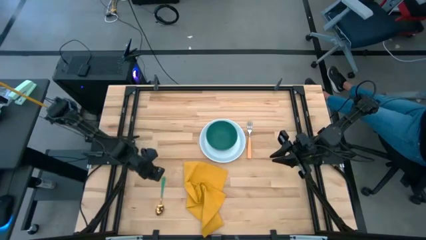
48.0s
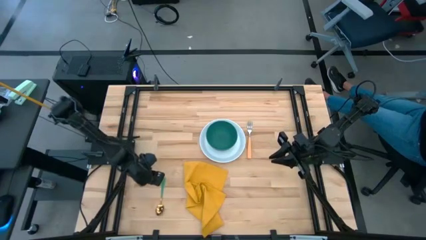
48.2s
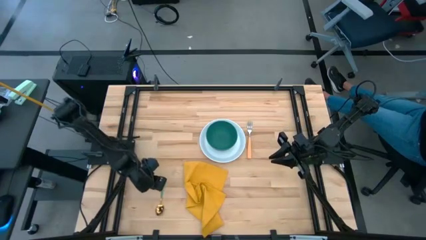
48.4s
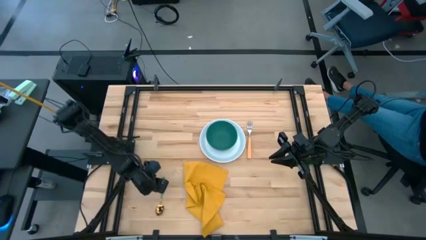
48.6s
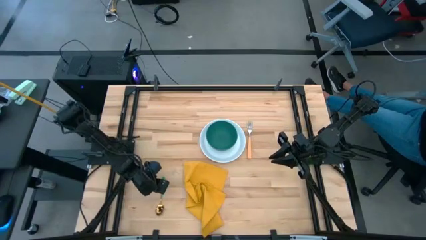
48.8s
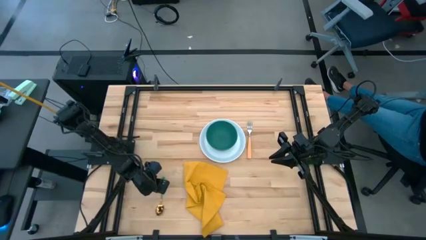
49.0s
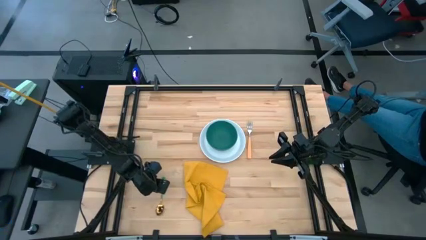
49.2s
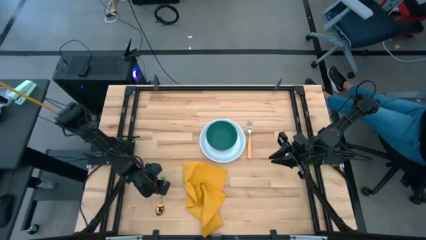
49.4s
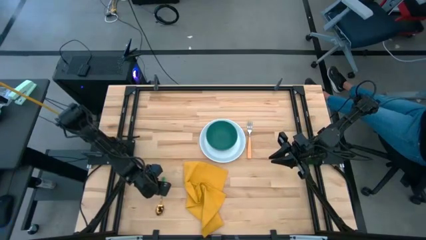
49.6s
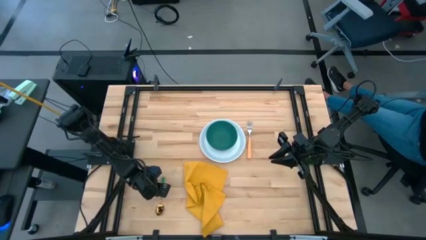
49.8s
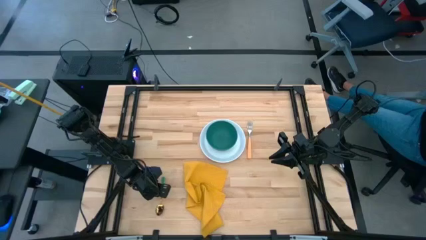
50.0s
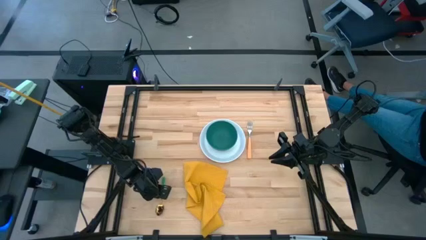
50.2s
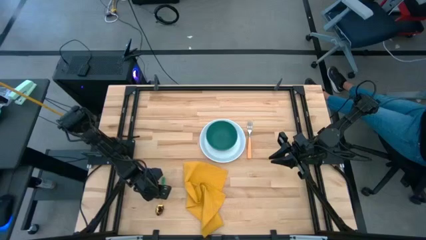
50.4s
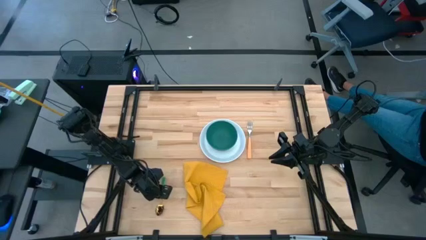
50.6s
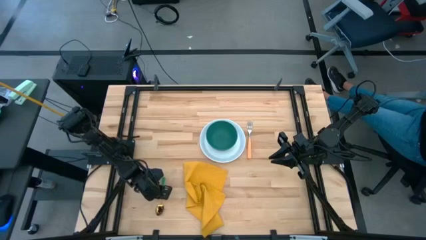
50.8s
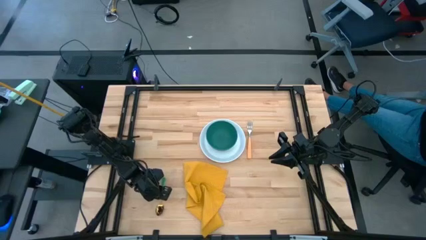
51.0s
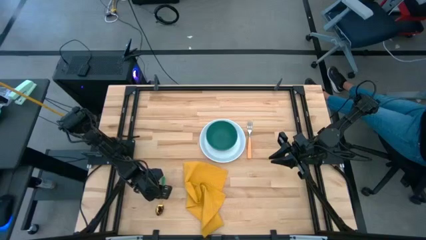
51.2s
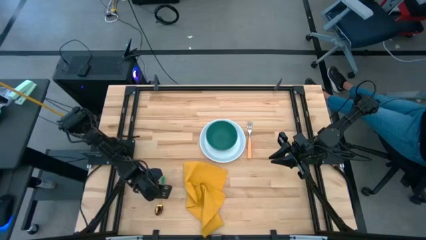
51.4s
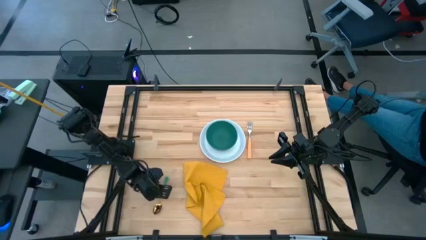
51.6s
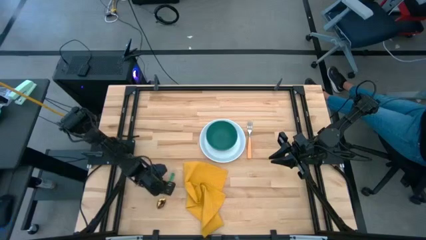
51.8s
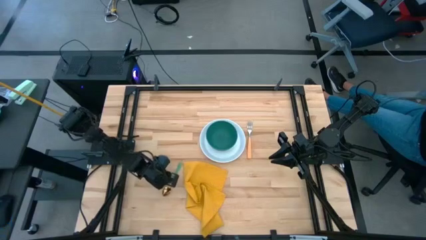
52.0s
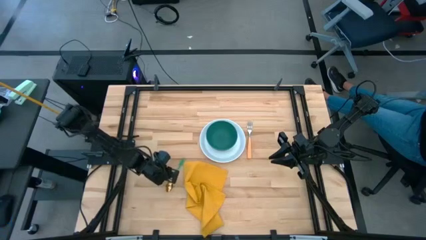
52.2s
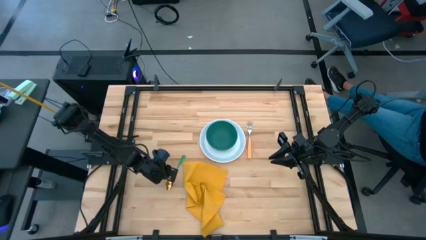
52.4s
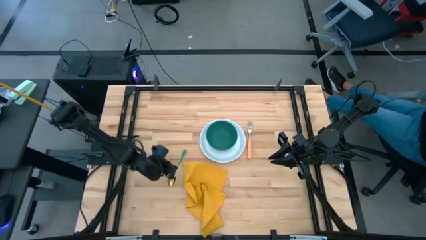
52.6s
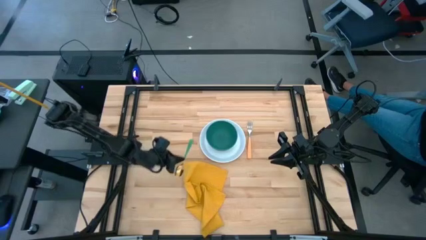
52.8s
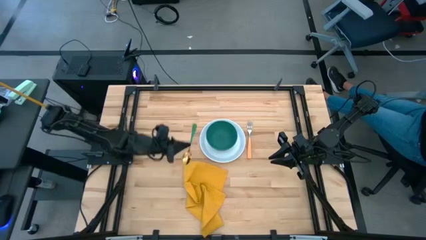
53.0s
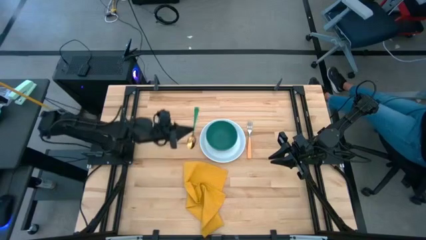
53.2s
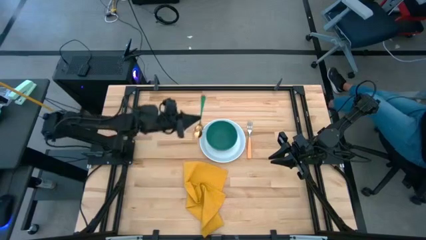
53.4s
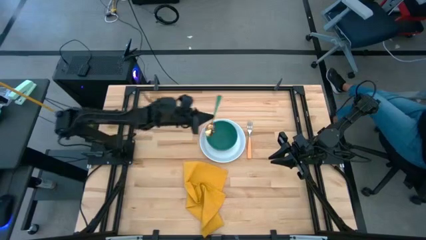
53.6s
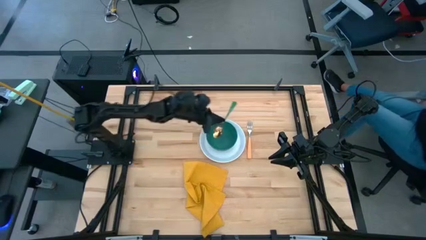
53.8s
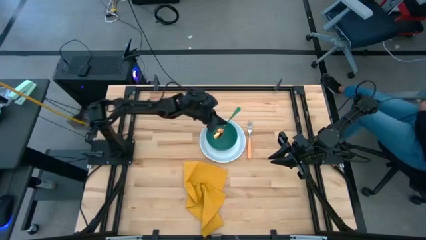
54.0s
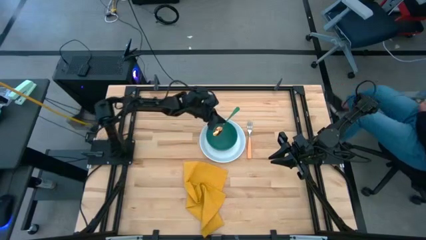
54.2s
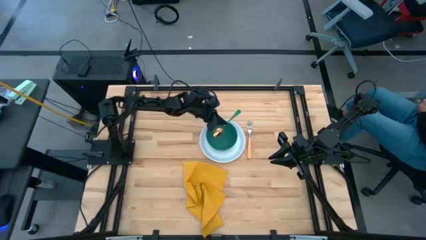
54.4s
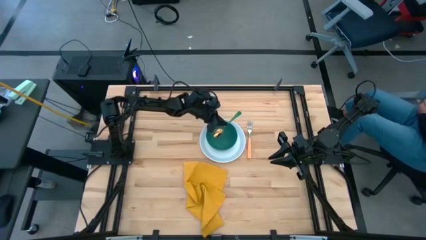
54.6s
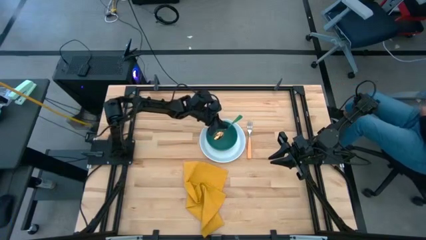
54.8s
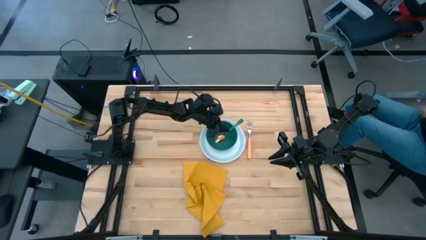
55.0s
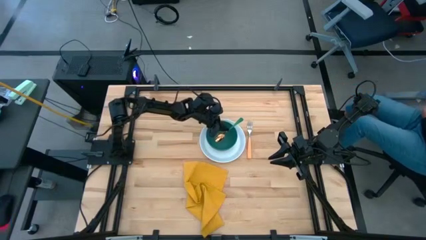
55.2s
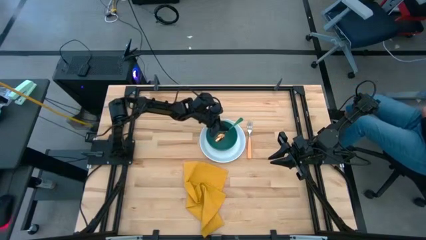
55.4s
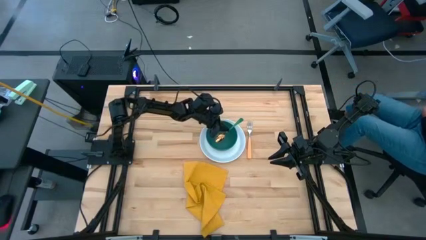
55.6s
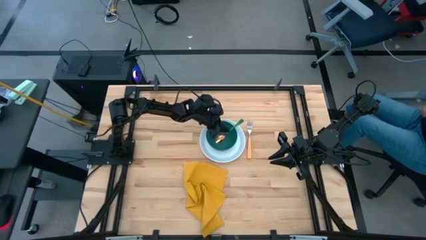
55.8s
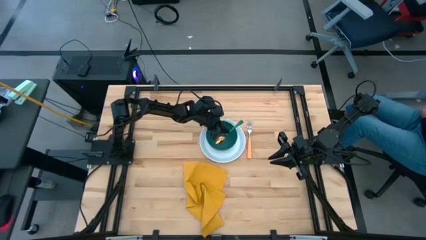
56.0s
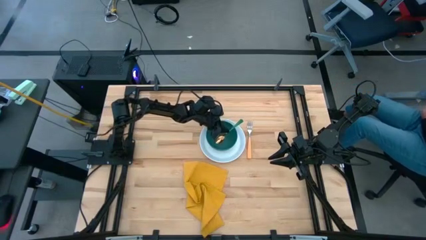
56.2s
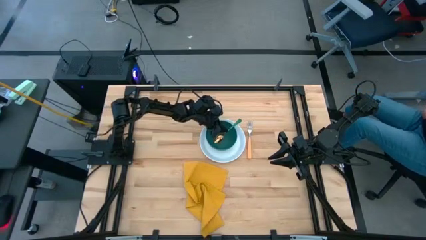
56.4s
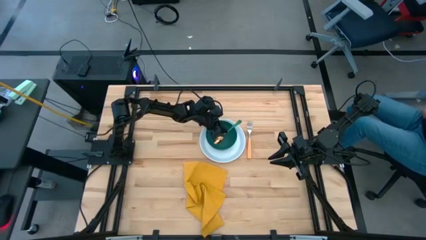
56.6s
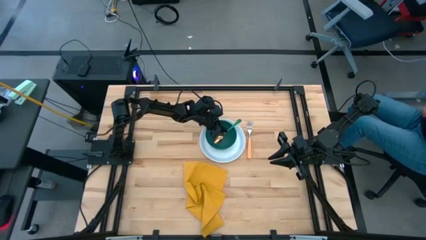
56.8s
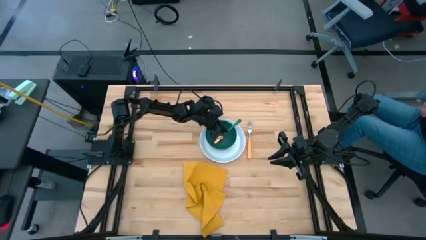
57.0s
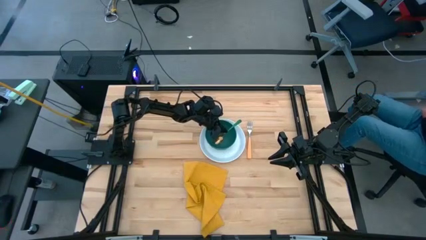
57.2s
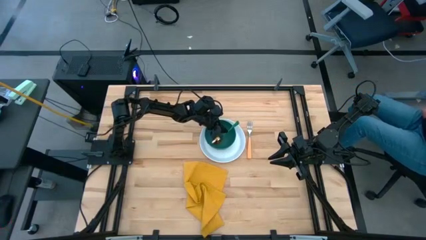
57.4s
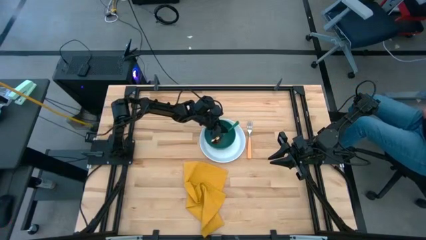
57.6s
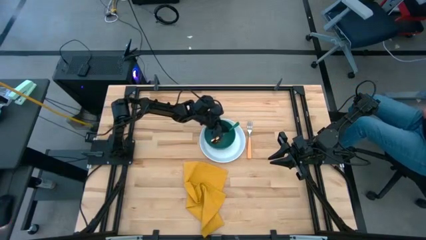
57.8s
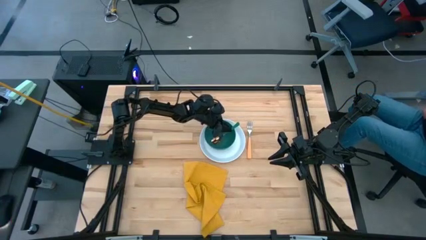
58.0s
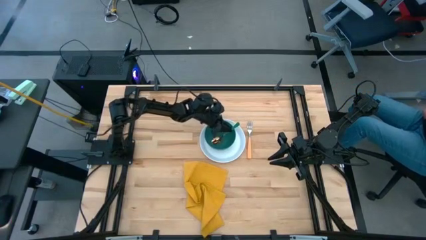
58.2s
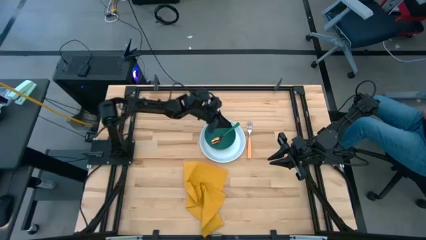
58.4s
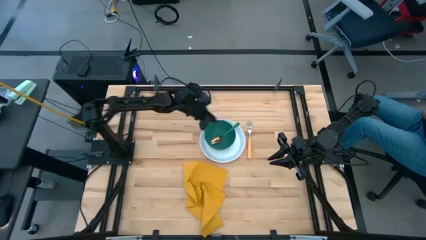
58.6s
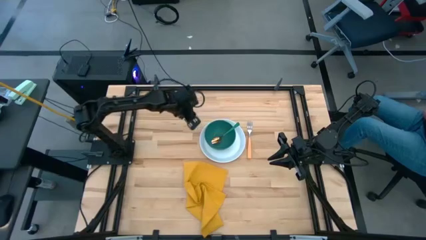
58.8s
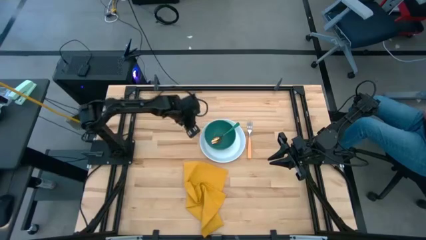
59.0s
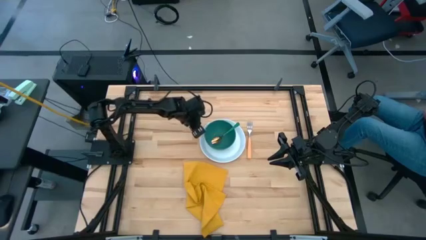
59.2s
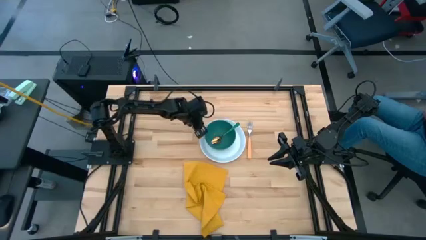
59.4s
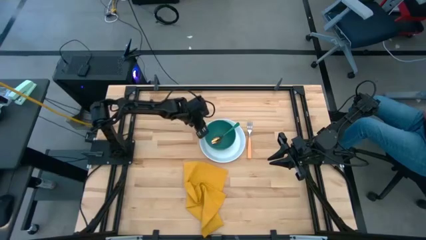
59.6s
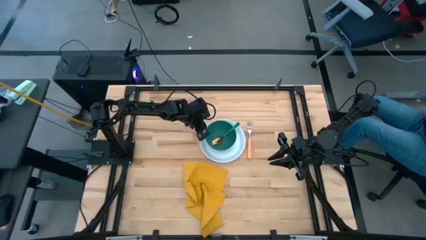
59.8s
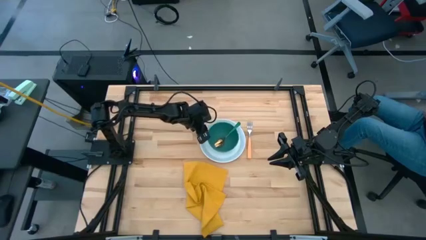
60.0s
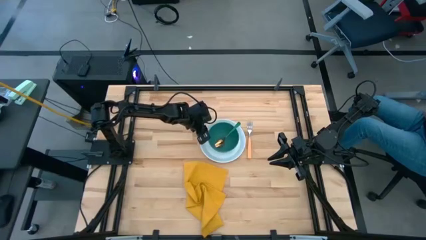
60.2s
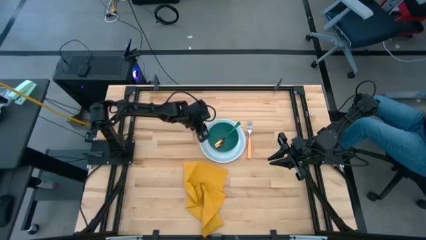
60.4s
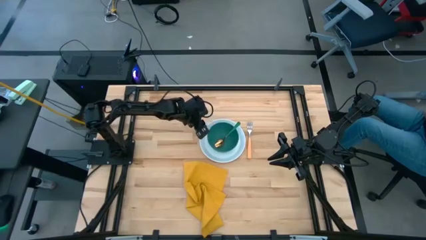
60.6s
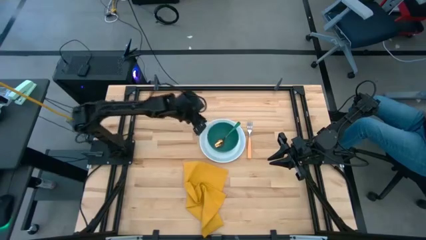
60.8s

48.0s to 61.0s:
Task: Set table place
Place the gold spoon inside the green bowl
